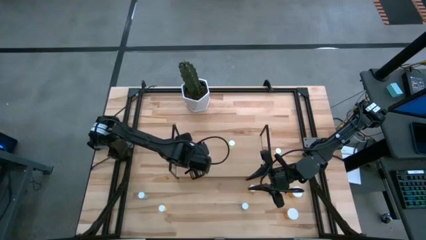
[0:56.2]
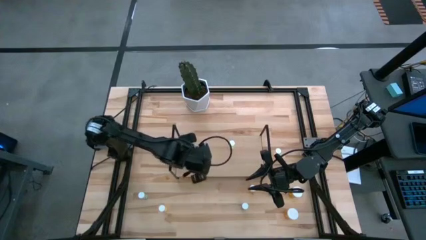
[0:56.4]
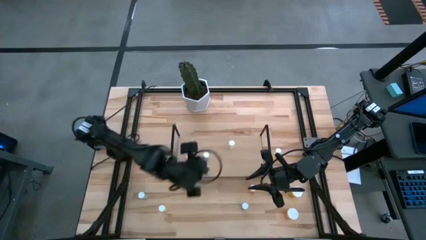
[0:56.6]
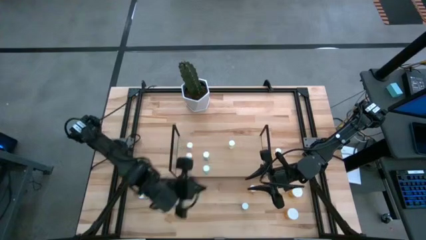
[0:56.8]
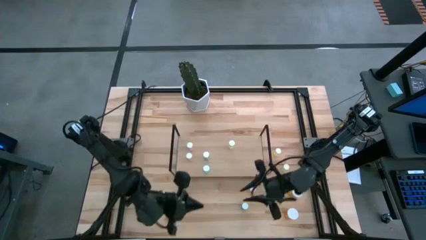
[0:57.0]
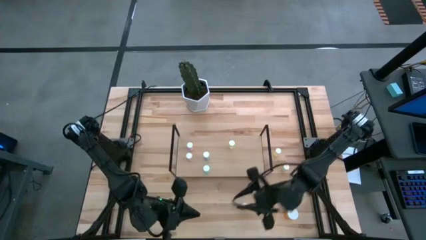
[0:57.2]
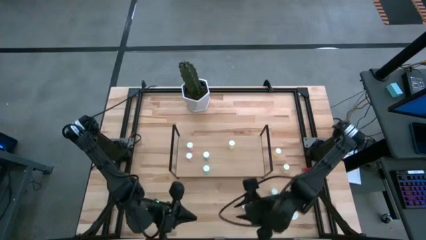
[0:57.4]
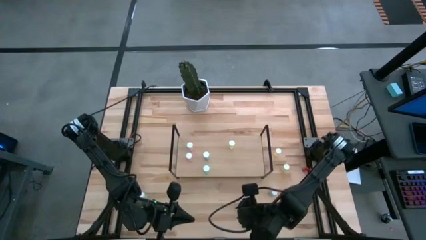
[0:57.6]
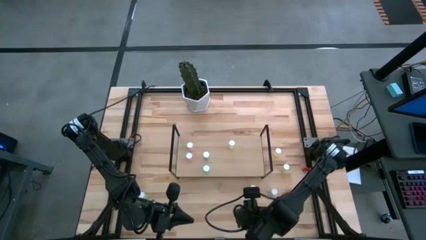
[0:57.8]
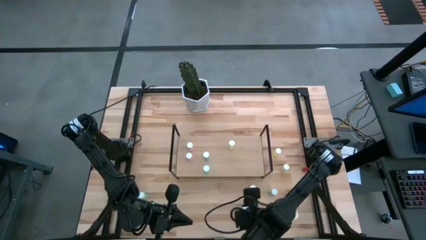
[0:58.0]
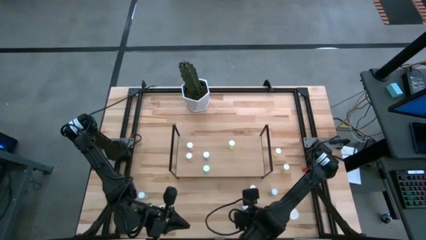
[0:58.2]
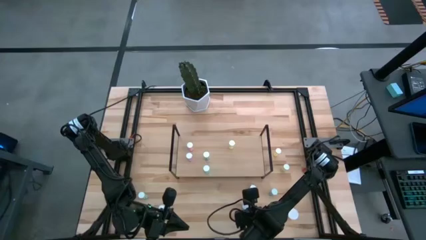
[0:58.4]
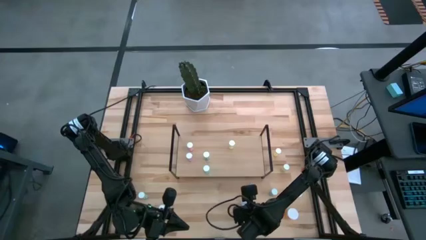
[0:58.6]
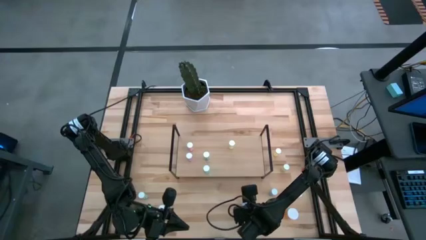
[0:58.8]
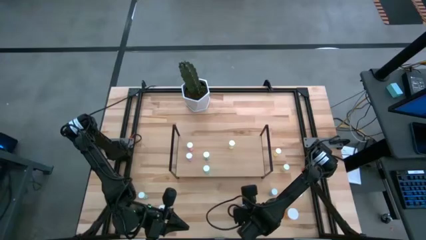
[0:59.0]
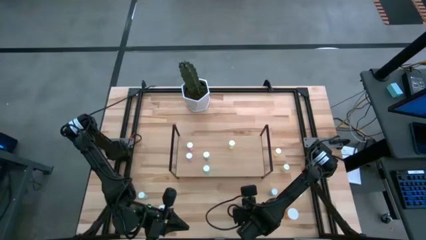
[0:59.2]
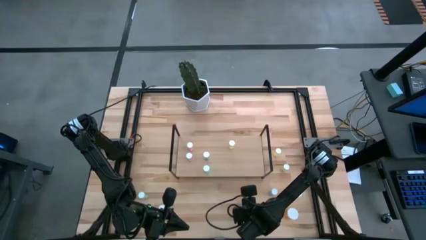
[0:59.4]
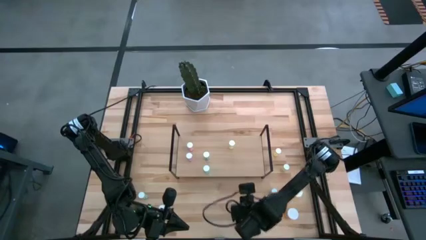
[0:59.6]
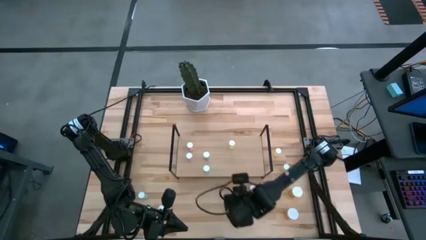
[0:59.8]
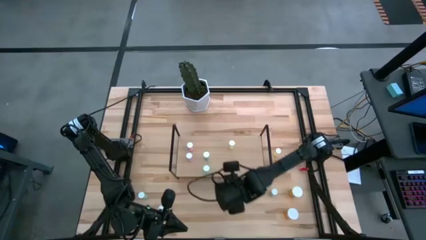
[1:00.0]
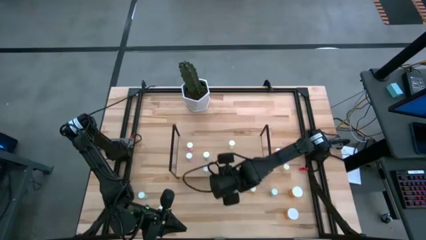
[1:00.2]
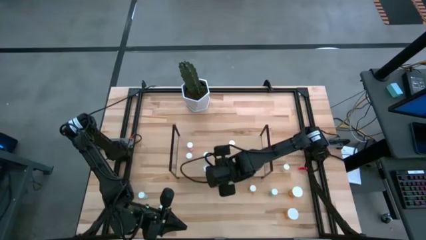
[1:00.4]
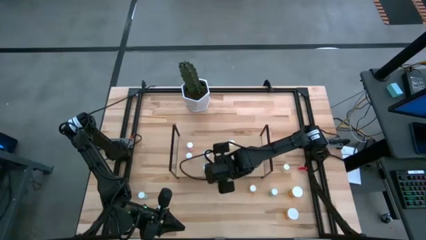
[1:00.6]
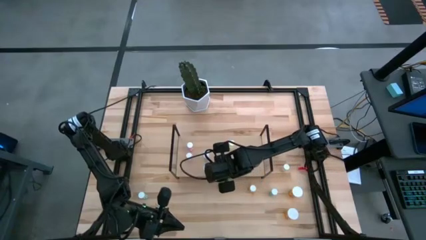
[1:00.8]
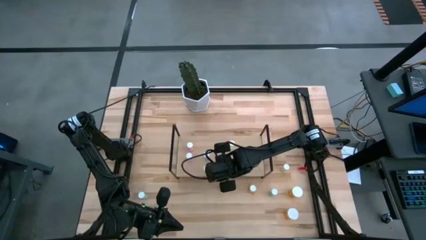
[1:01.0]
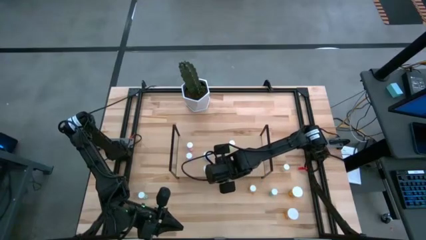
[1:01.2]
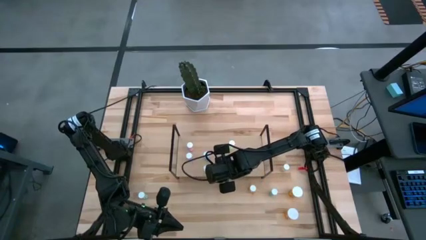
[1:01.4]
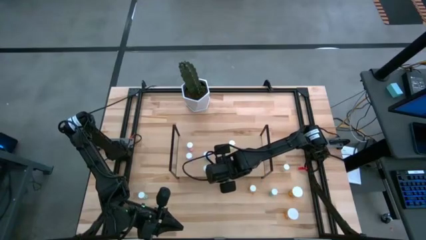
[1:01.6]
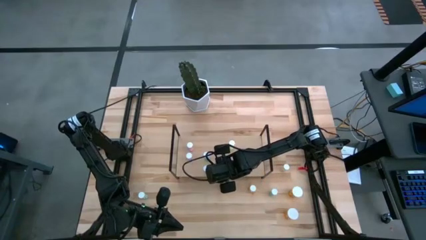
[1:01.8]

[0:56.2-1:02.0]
Task: Pick and place medicine bottles onto shelf by color
Put the blue pill bottle on the shelf

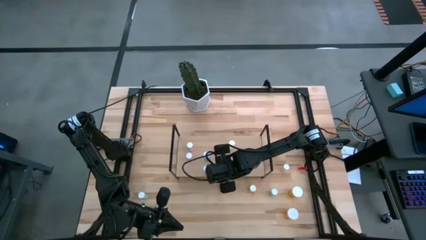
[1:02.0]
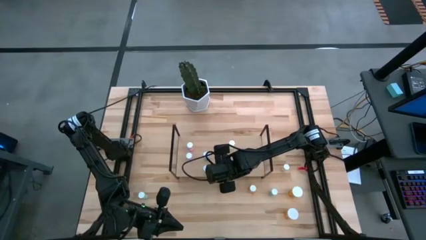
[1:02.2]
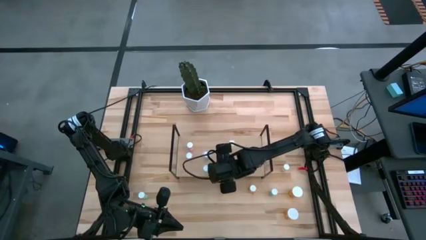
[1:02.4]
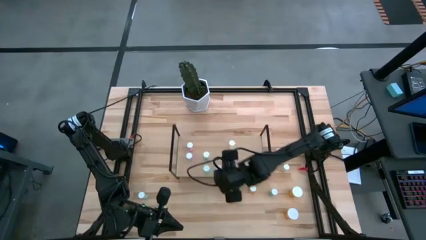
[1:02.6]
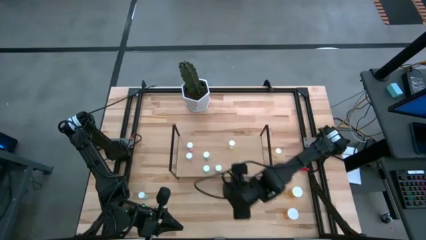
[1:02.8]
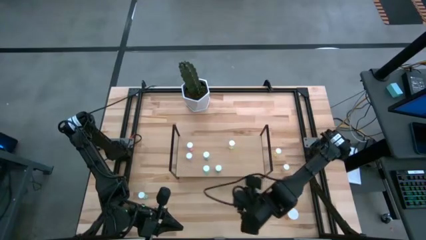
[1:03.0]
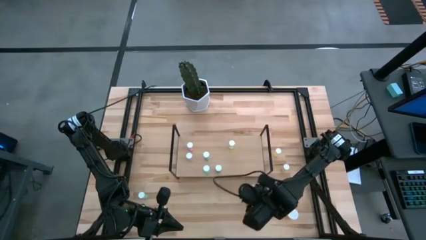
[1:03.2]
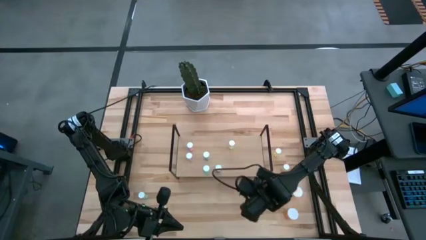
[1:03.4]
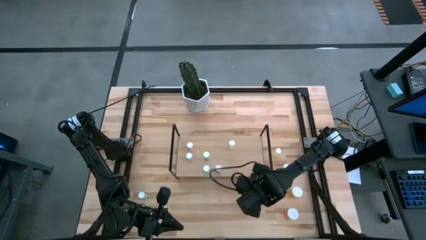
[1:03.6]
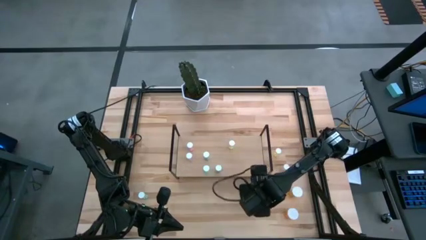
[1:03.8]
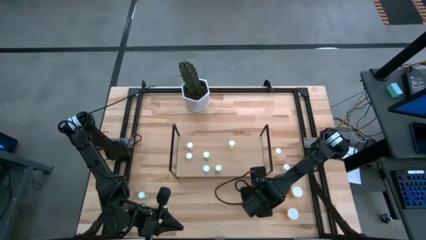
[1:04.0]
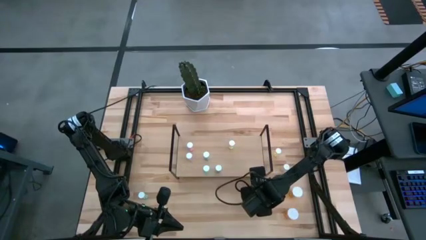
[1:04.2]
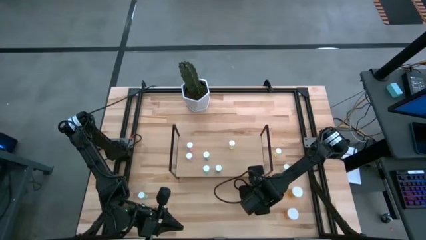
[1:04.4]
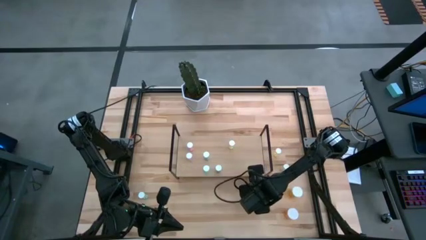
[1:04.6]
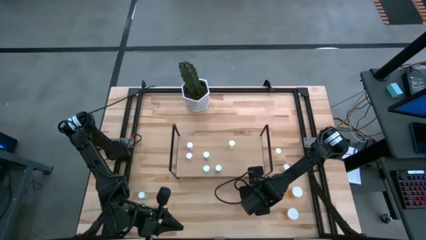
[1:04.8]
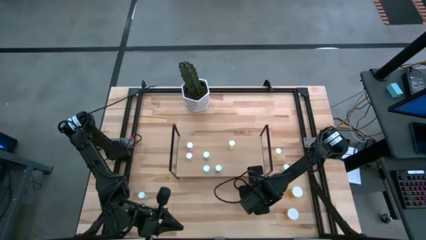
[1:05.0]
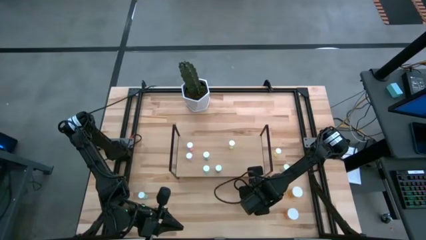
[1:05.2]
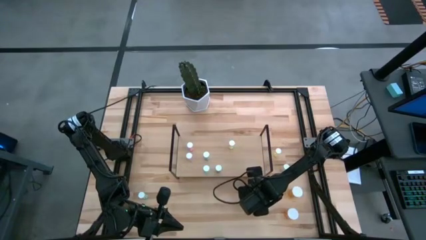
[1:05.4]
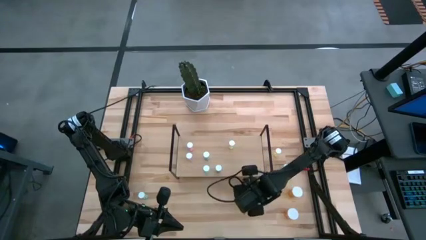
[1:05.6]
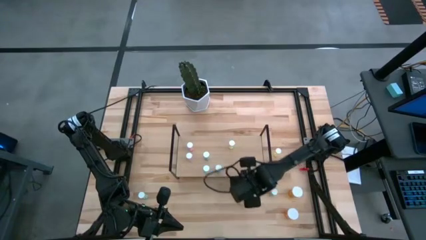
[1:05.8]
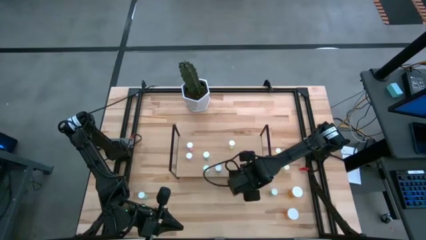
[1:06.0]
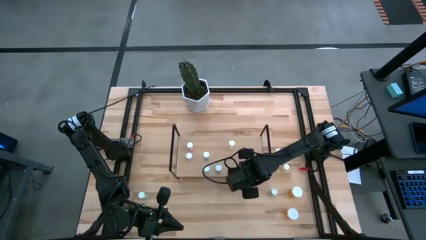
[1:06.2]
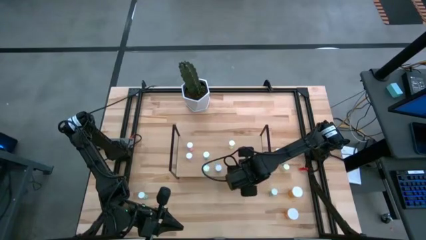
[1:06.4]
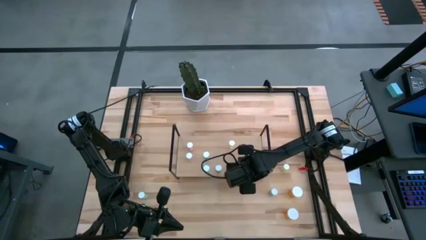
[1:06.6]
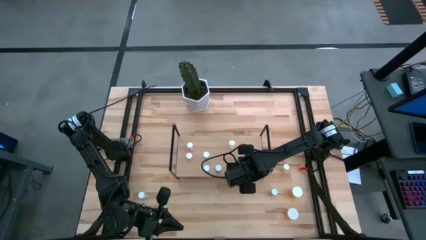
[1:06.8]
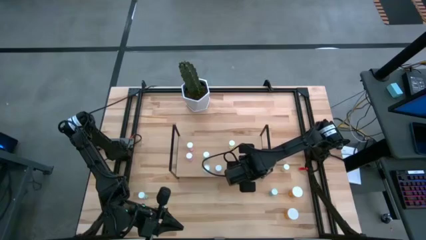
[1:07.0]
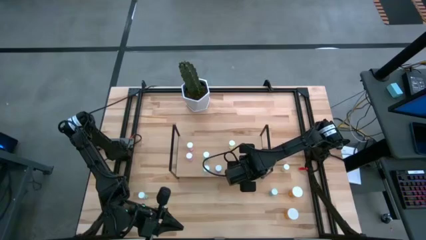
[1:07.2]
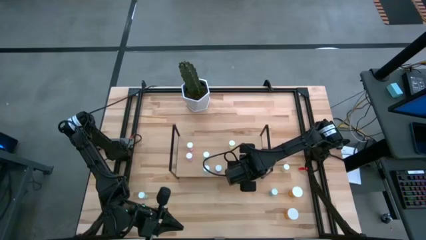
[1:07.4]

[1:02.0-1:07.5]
Put the yellow pill bottle on the shelf

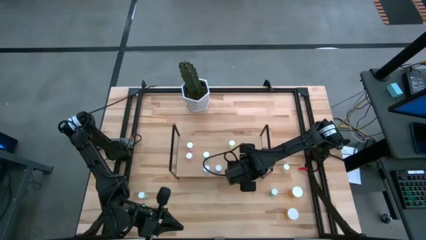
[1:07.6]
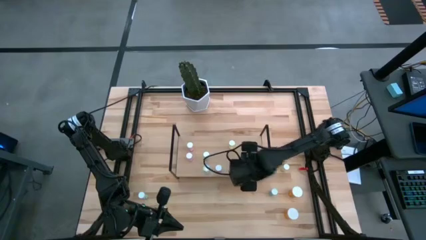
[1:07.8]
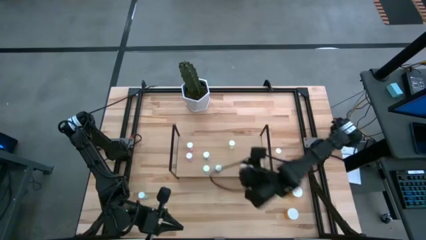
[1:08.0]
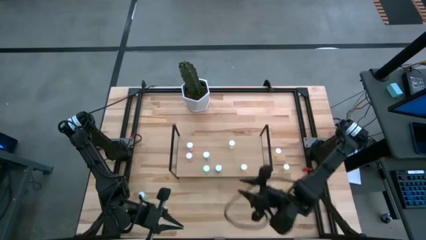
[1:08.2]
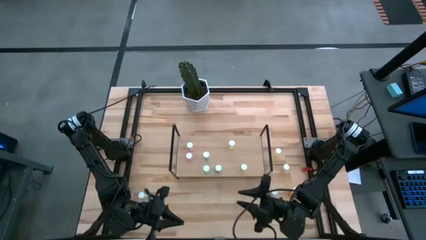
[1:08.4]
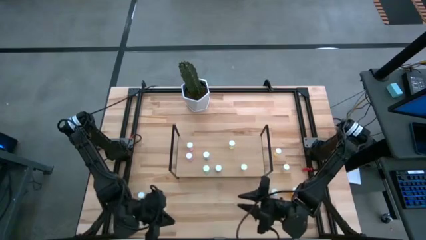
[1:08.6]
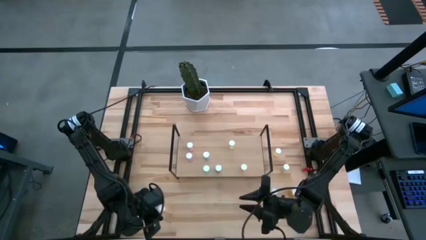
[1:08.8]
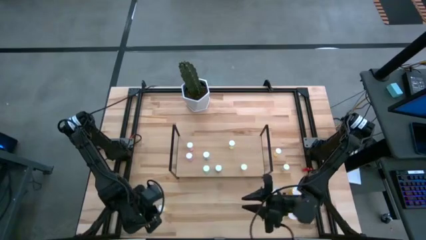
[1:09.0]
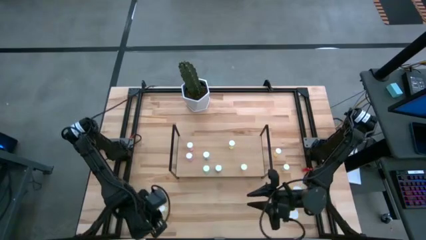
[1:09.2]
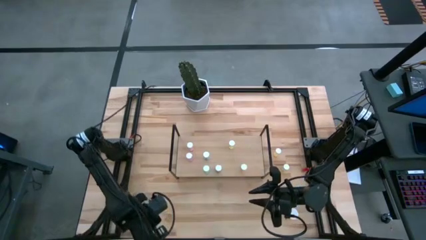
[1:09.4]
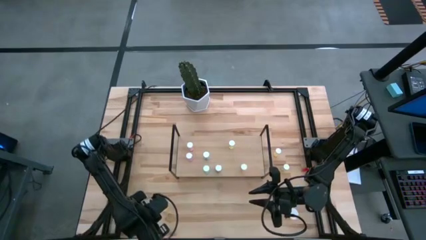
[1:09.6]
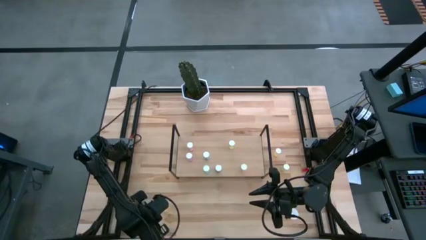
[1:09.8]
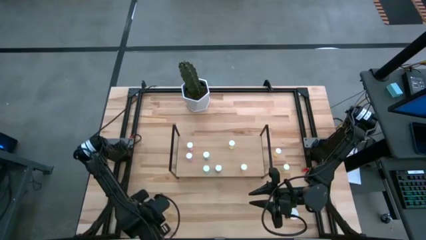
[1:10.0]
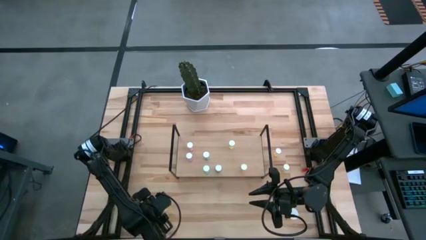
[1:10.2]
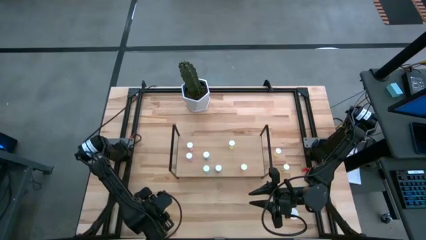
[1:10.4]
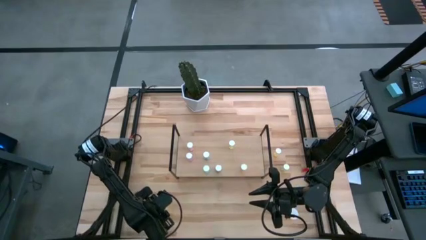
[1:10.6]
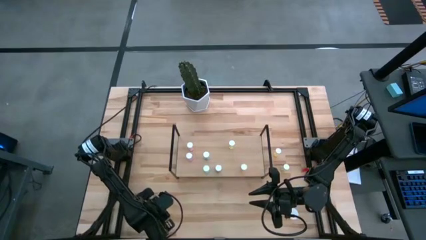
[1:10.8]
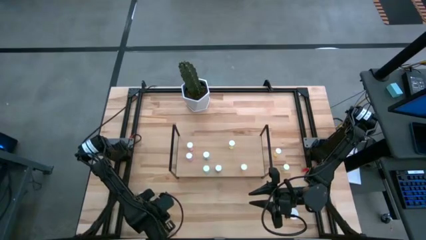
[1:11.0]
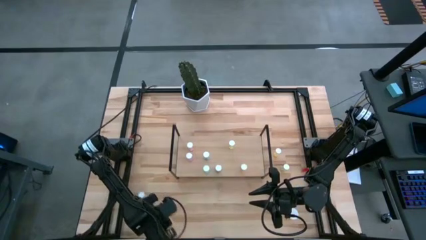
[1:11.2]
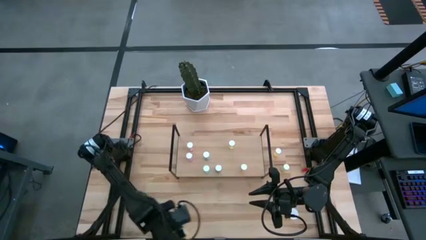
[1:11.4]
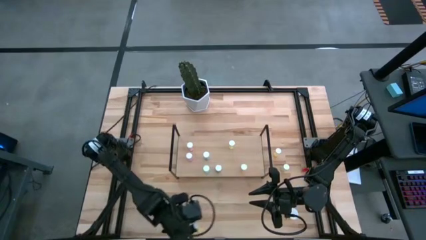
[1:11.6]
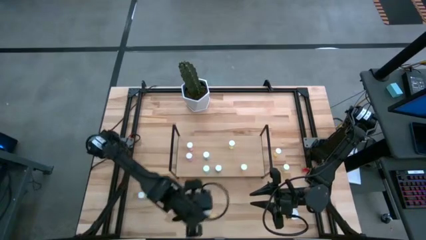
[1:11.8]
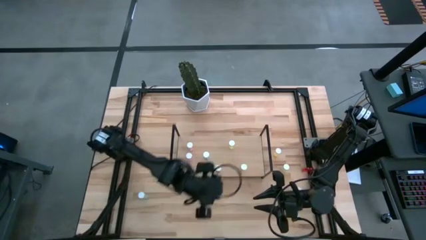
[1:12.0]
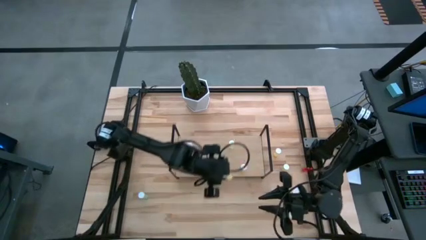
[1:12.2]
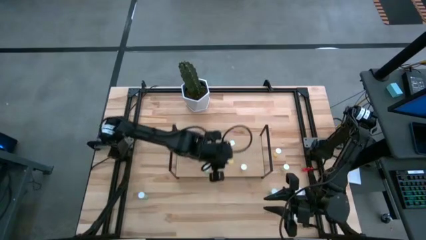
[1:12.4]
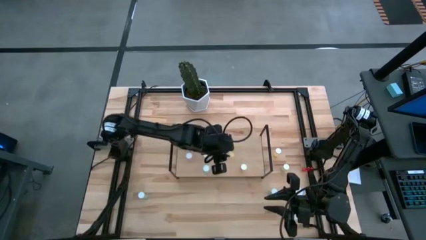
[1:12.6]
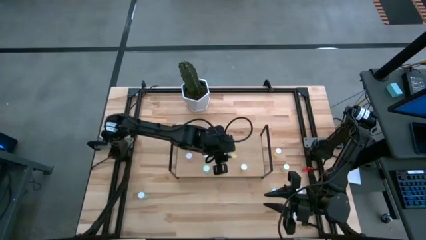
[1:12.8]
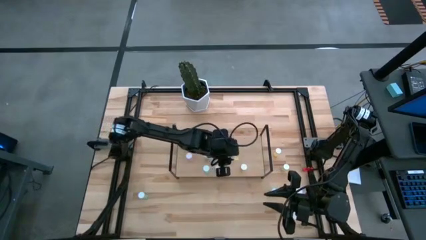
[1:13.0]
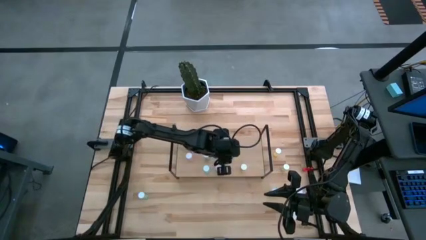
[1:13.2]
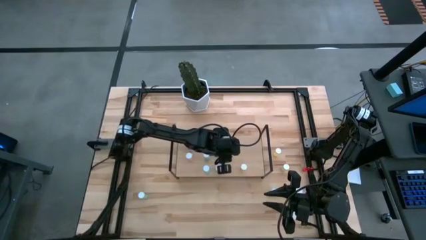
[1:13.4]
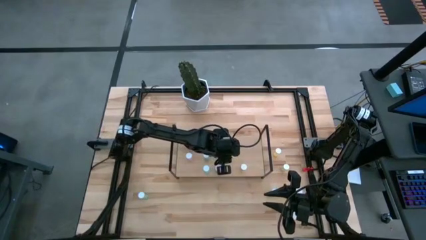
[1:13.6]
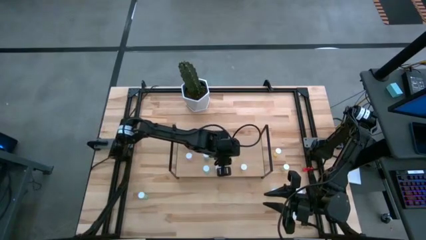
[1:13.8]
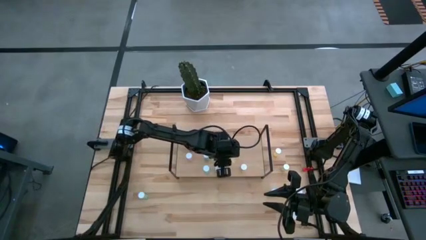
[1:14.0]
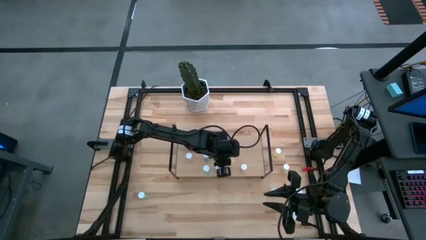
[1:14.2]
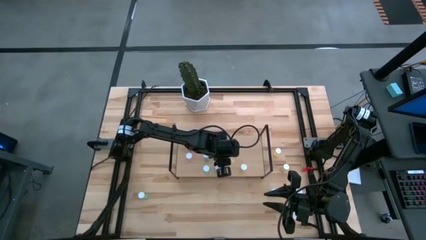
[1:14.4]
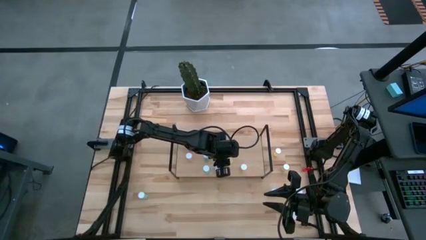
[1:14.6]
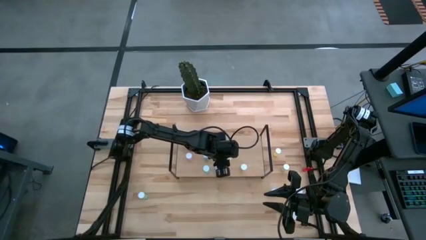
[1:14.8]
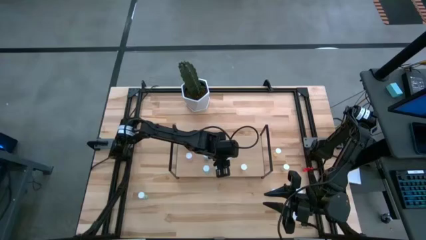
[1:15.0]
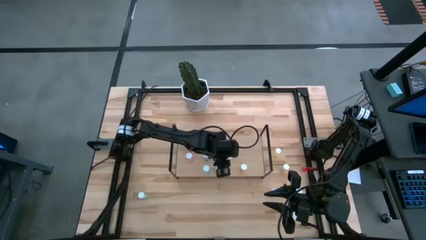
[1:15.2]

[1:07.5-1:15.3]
Put the yellow pill bottle on the shelf aligned with the other yellow pill bottle
